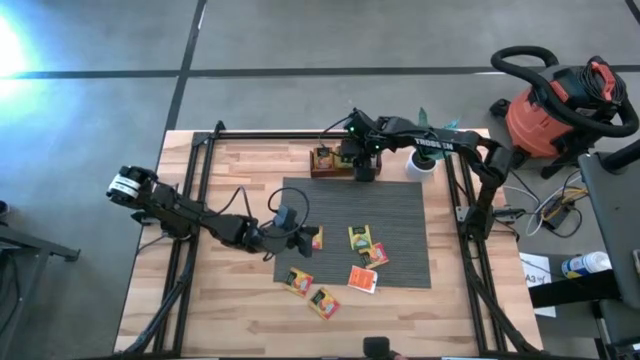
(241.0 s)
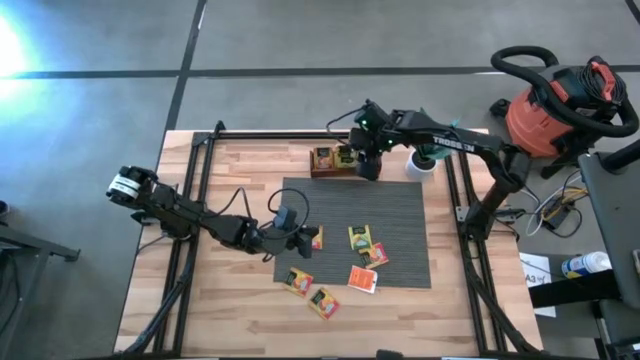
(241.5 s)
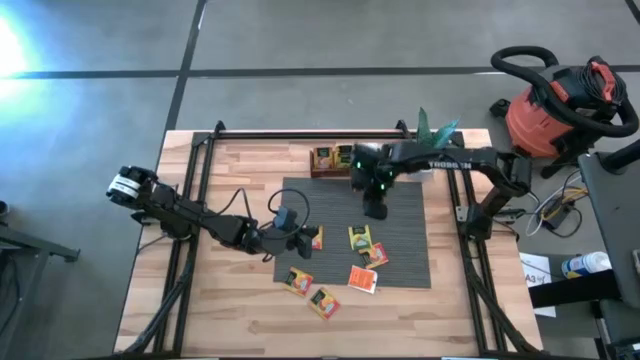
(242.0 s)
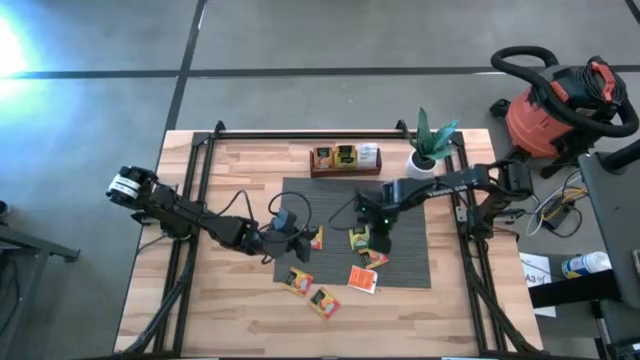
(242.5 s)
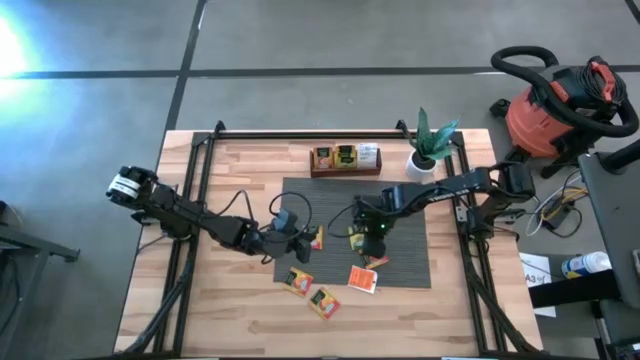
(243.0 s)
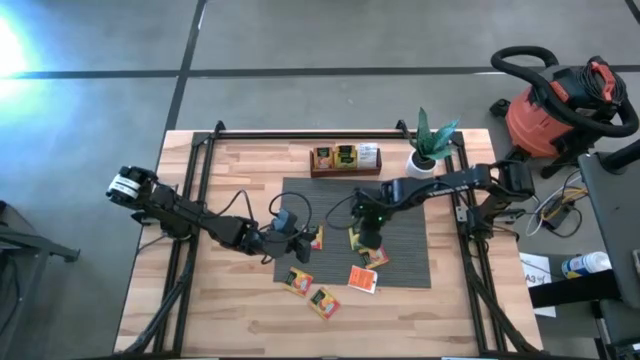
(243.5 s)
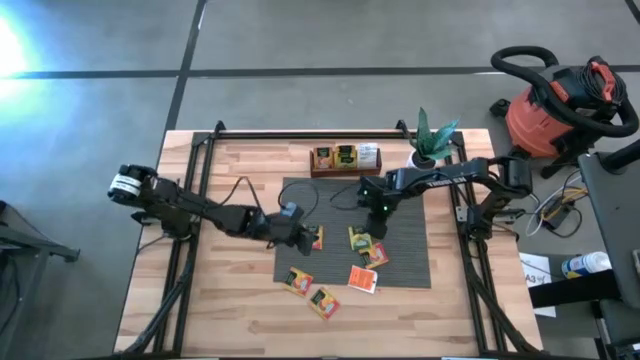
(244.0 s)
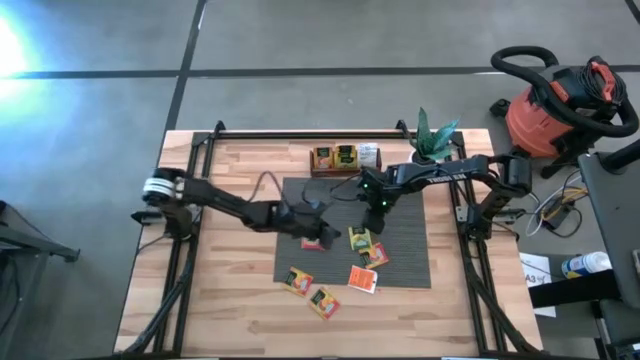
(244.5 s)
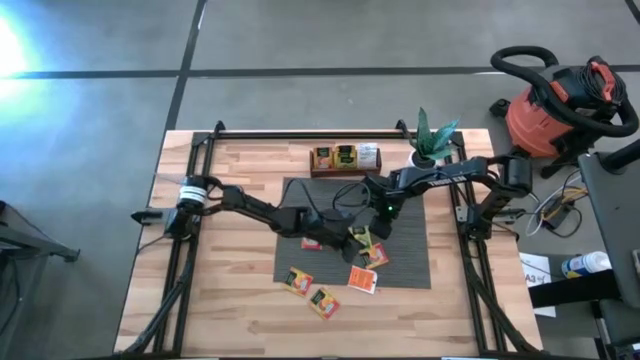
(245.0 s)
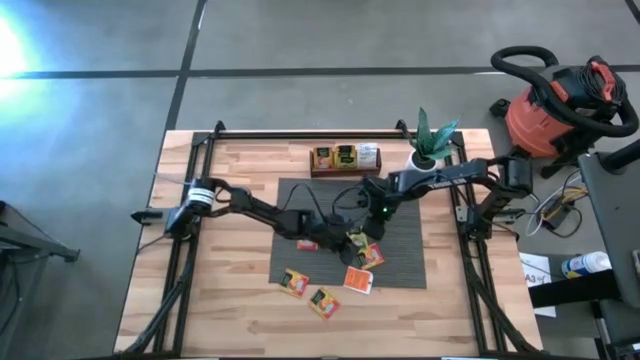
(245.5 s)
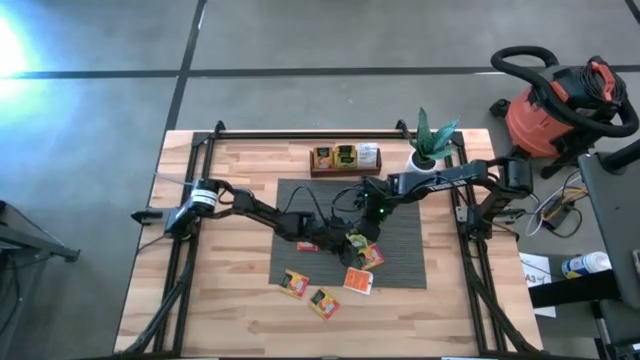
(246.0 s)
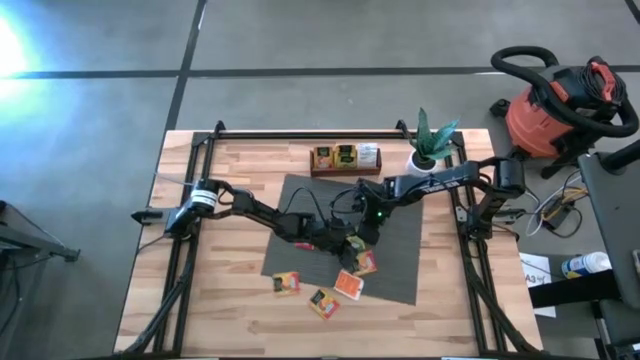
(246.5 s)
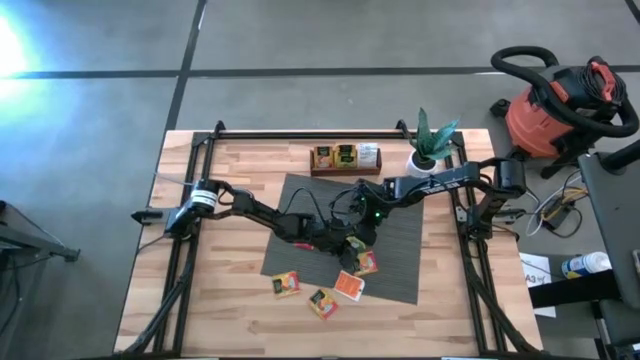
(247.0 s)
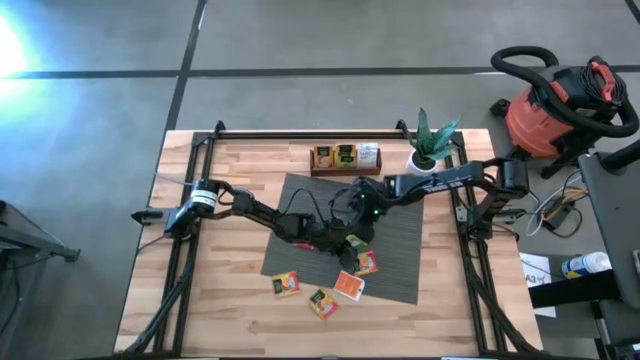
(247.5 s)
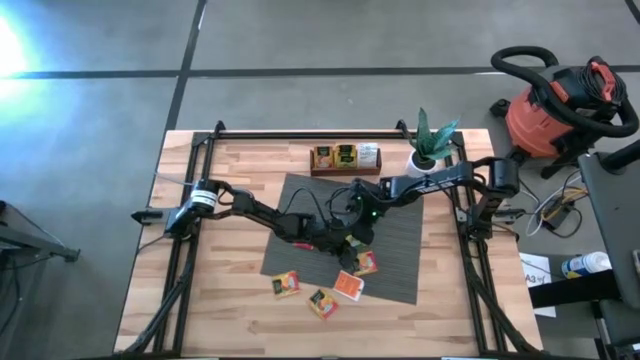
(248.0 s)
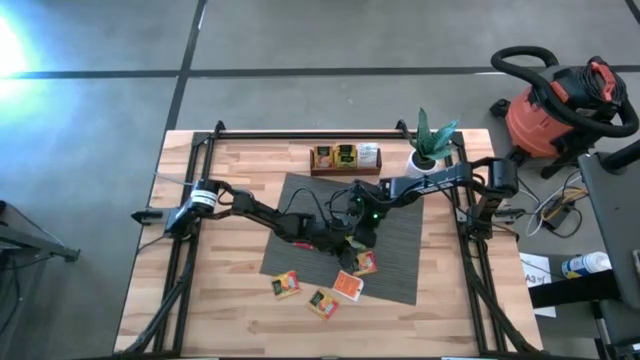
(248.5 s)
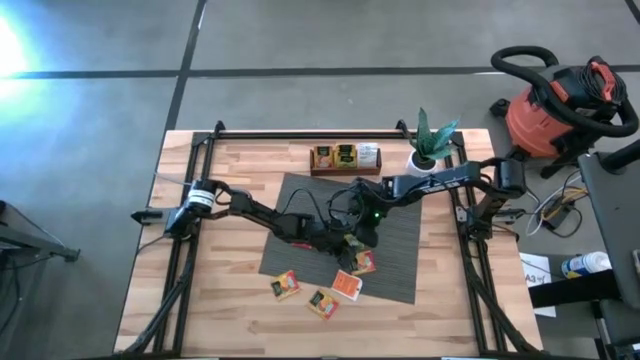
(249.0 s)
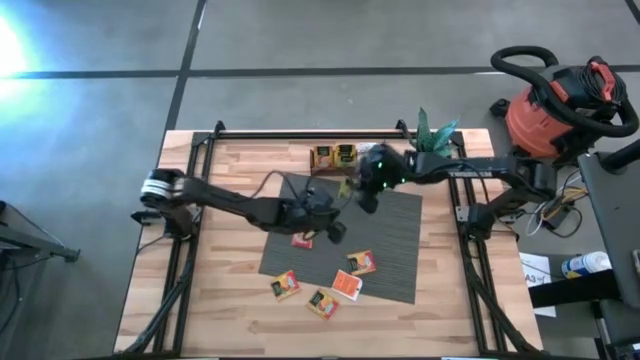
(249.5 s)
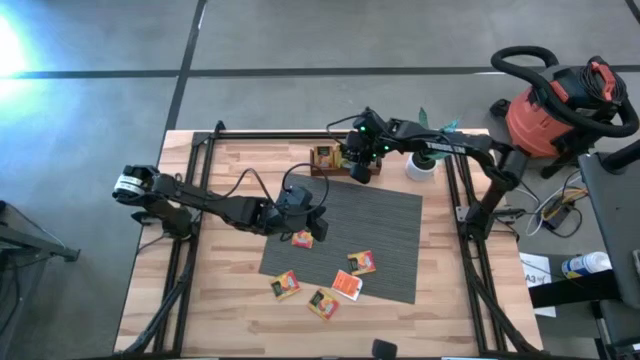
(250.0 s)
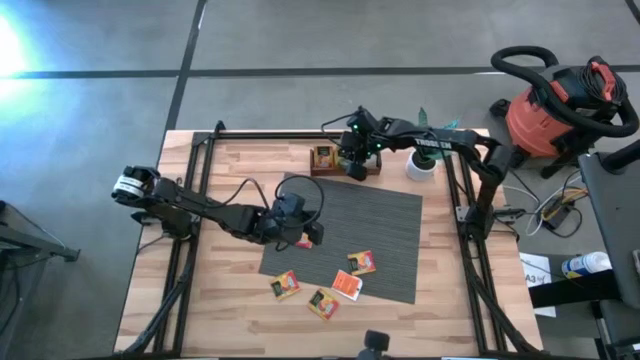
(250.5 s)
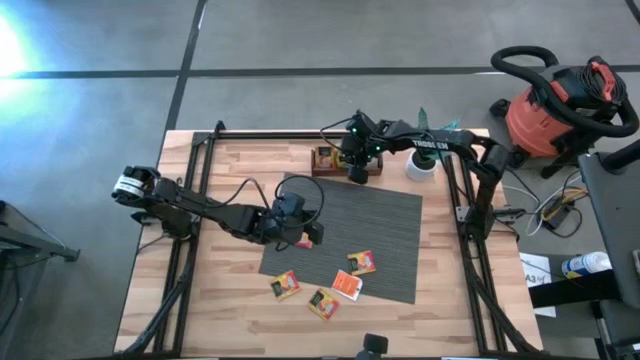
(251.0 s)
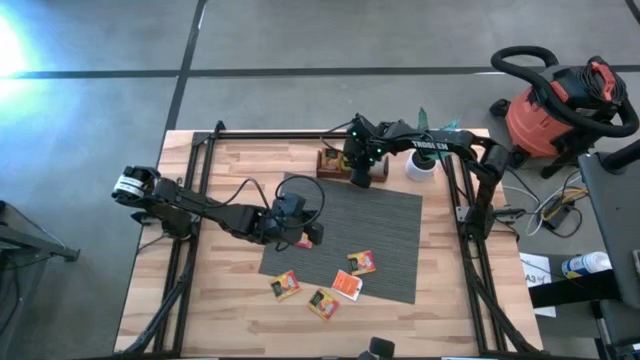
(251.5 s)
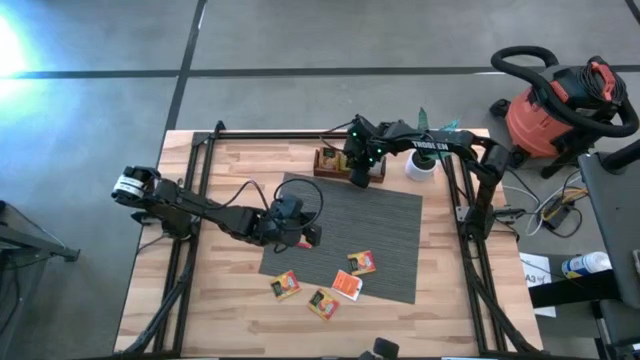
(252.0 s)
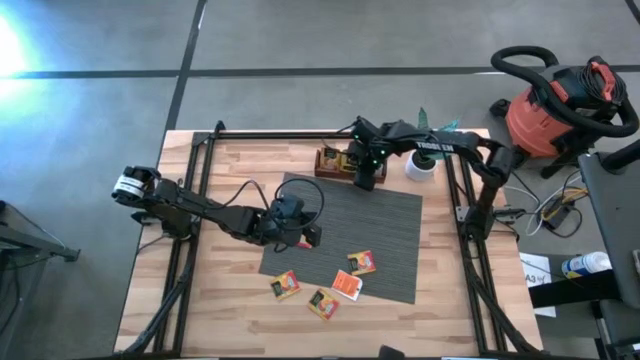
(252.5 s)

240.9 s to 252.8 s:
Task: Pick & Place Tea
Put the yellow tea bag into the middle section of the wooden organizer

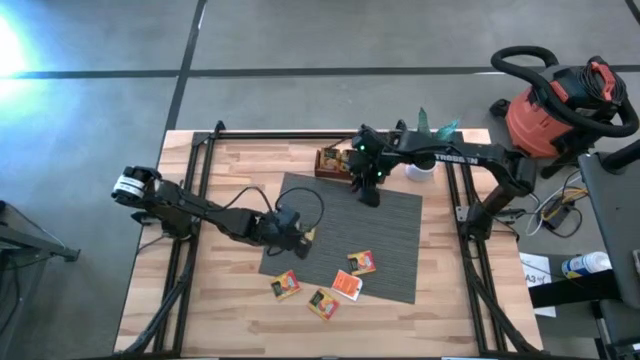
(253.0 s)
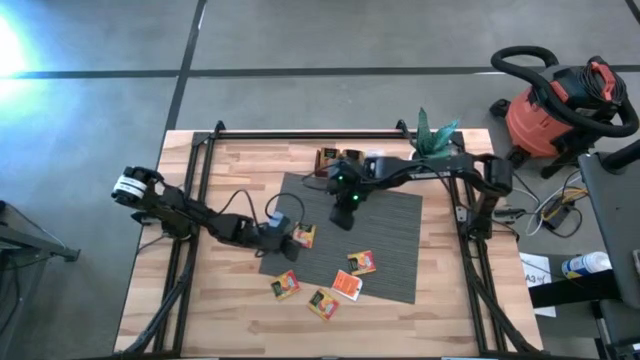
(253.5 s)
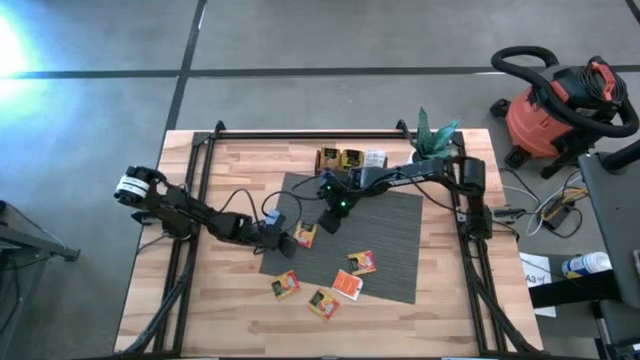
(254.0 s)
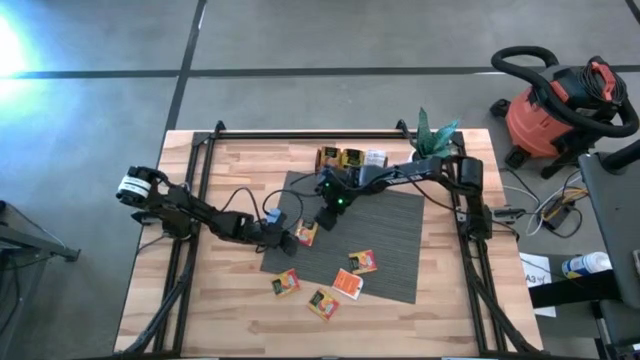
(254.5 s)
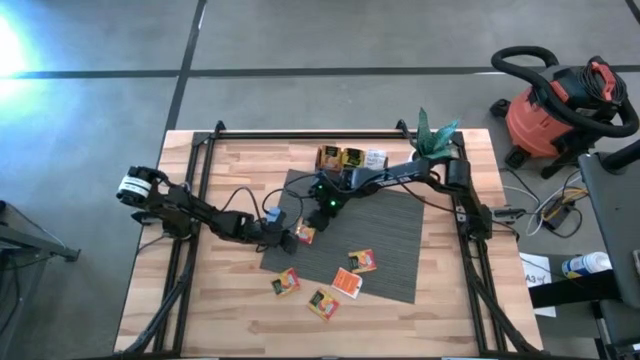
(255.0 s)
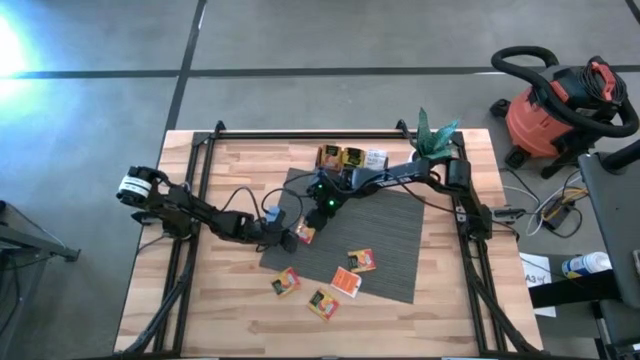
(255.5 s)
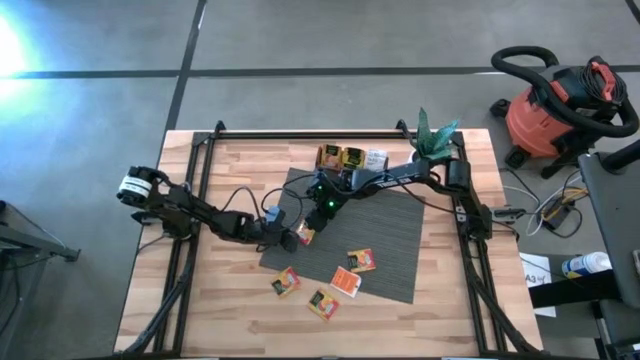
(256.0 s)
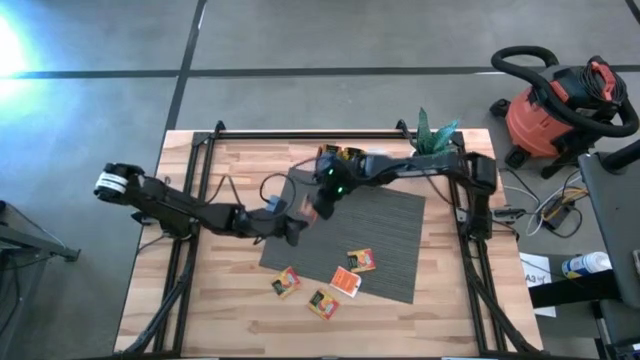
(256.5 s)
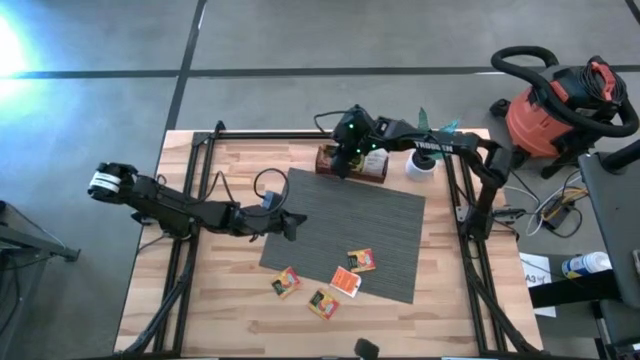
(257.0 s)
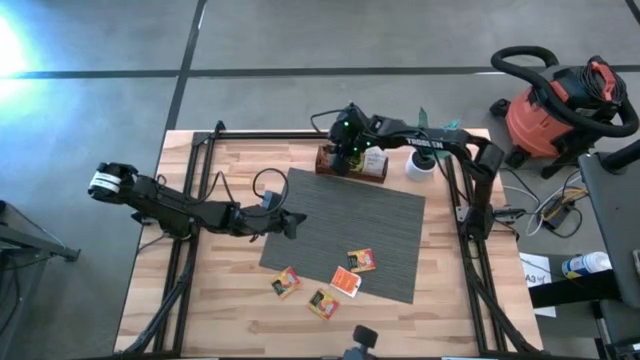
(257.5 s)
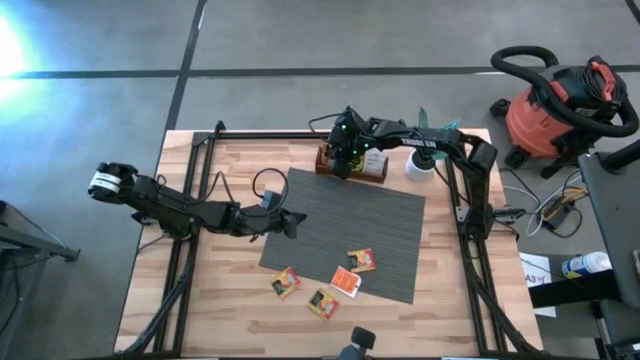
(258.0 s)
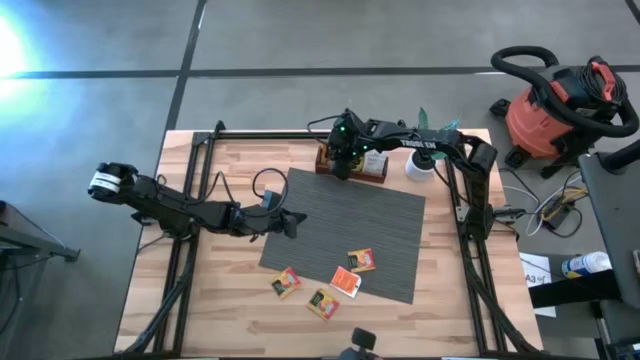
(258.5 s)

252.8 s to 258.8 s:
Put the orange tea bag into the left section of the wooden organizer

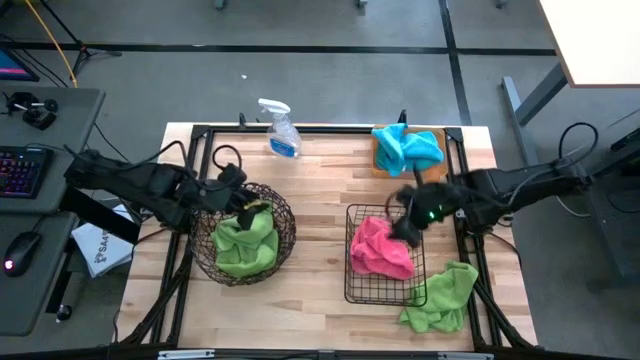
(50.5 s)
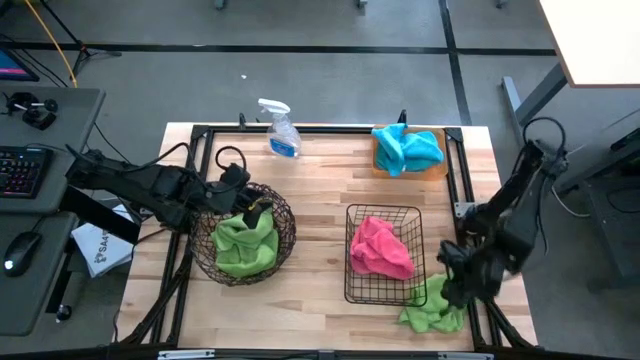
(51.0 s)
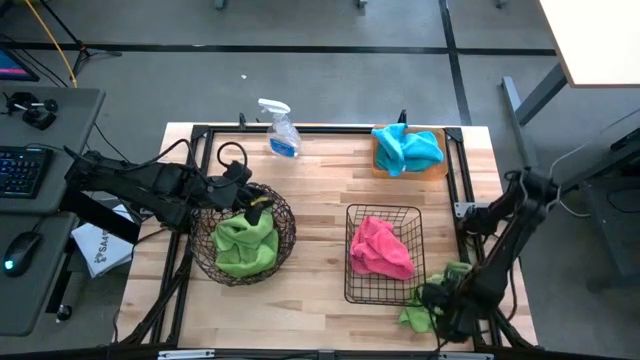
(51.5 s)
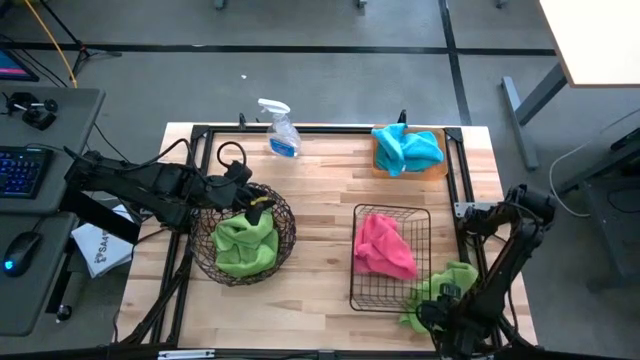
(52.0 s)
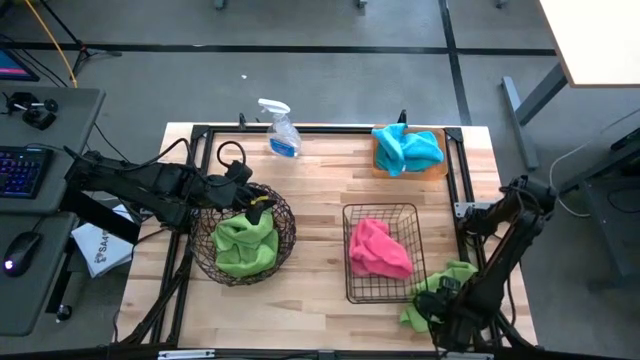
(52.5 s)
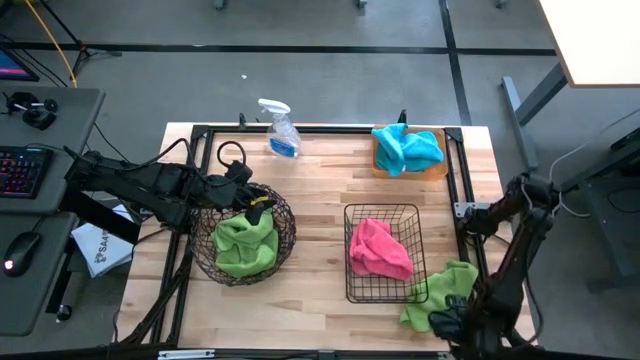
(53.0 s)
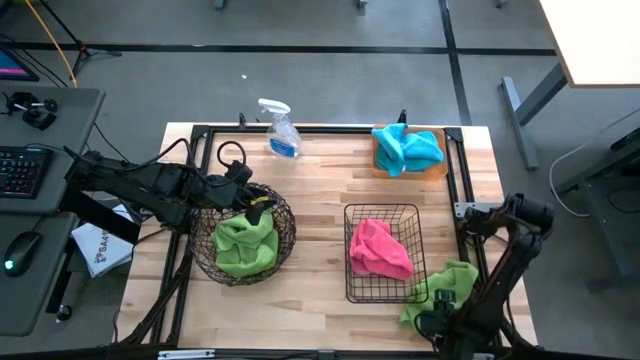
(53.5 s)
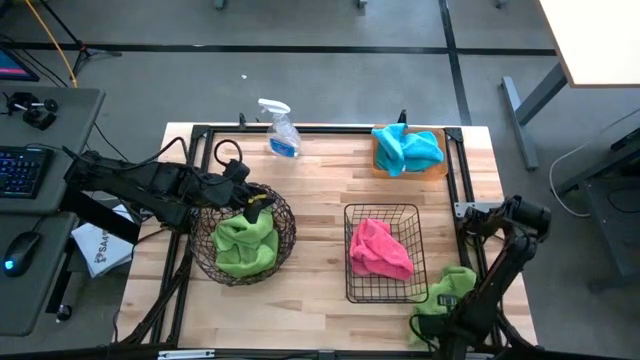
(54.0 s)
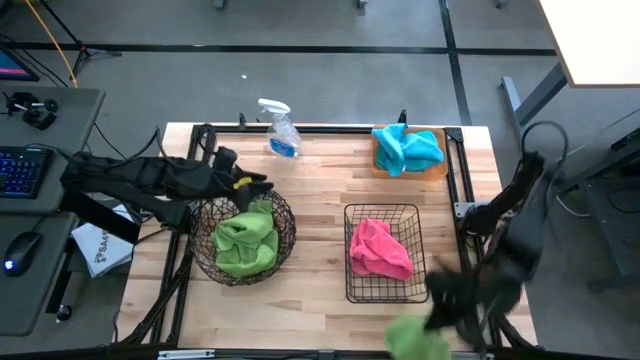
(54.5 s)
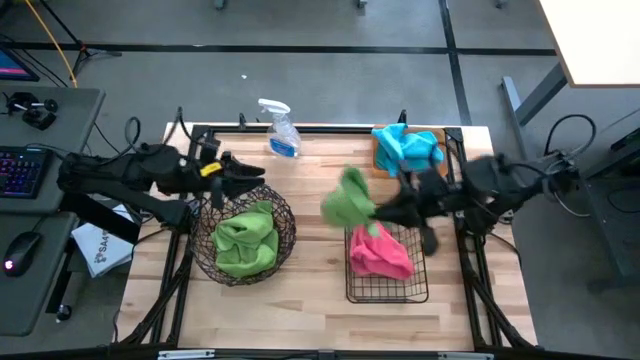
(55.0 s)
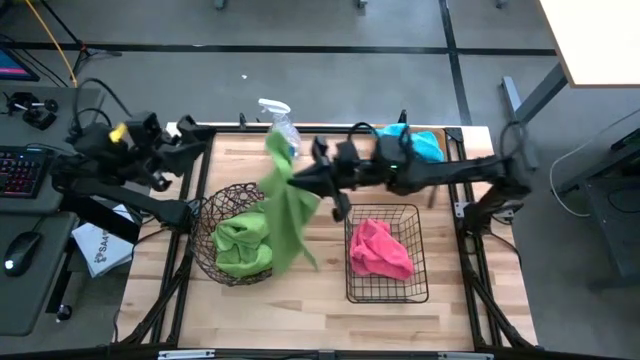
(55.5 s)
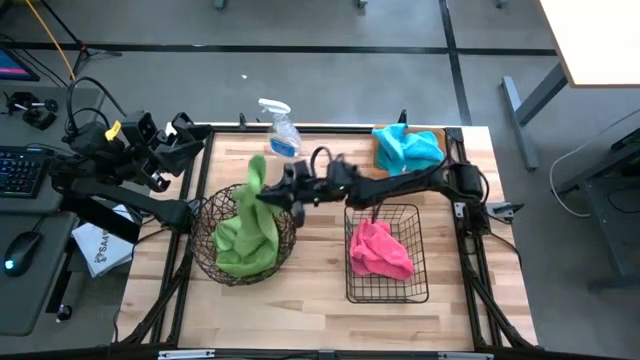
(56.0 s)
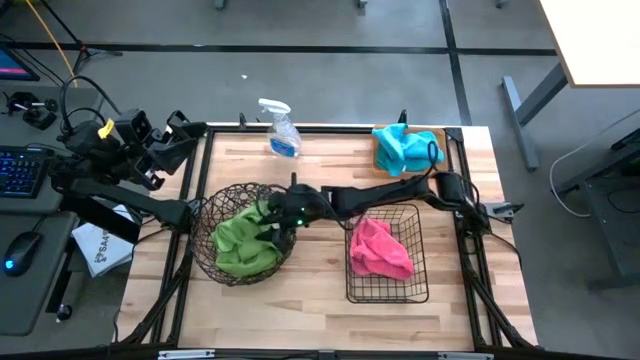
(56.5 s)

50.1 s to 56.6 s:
Task: Sort microfiber towel by color & place in baskets
Put the green towel into the round wire basket
